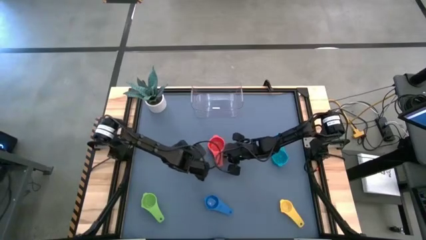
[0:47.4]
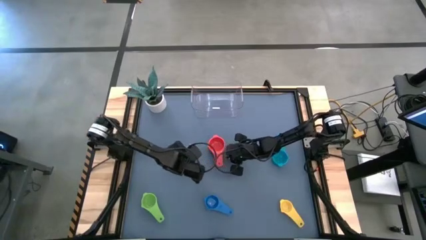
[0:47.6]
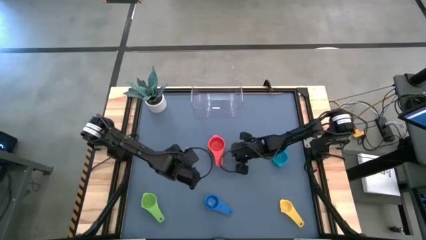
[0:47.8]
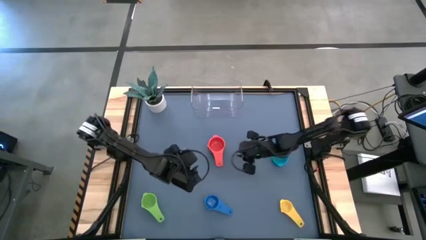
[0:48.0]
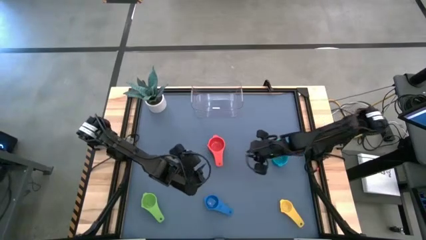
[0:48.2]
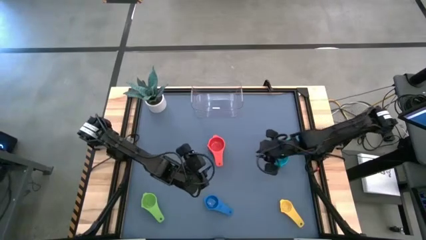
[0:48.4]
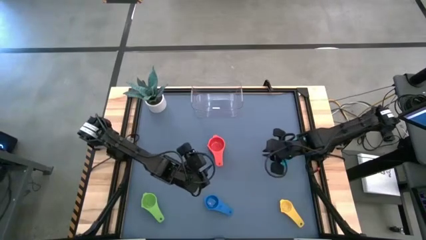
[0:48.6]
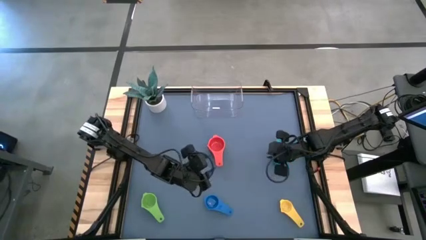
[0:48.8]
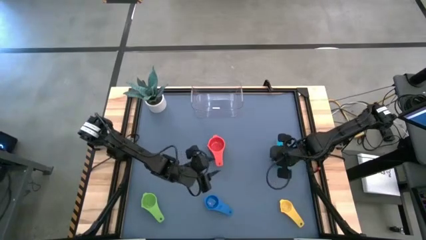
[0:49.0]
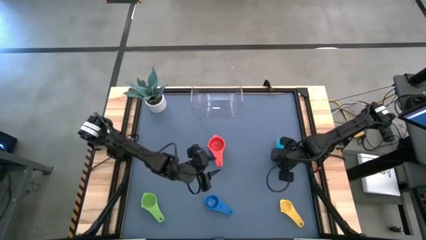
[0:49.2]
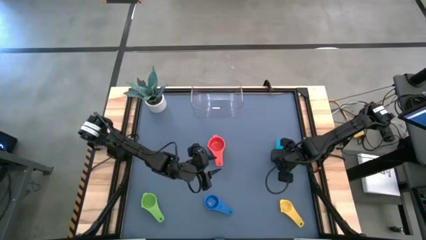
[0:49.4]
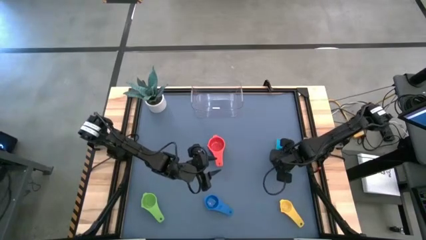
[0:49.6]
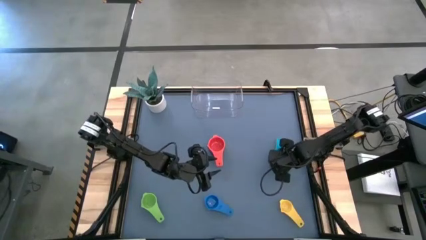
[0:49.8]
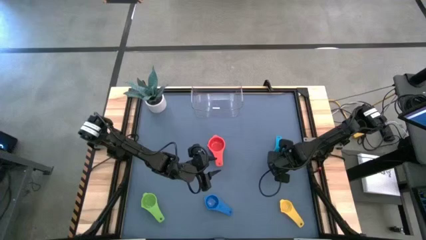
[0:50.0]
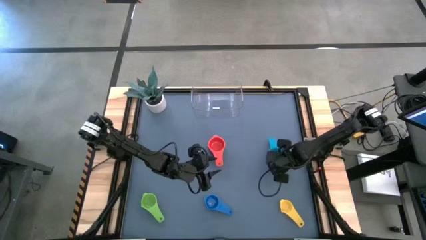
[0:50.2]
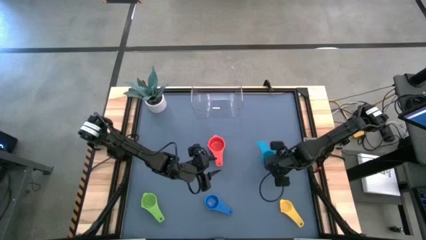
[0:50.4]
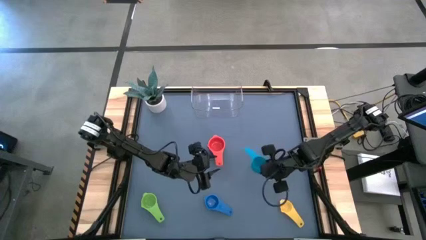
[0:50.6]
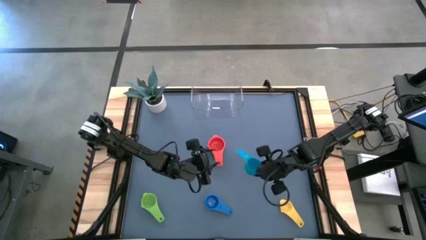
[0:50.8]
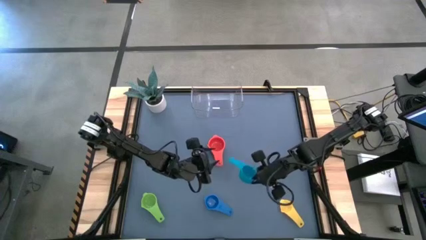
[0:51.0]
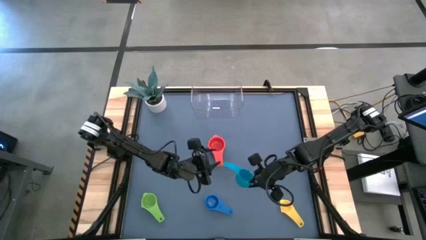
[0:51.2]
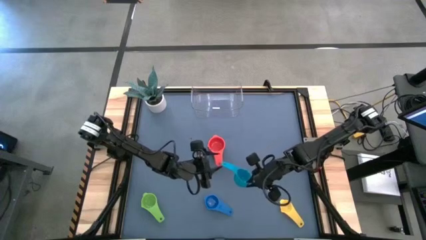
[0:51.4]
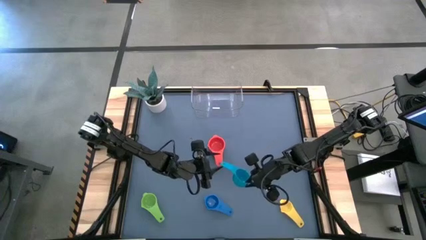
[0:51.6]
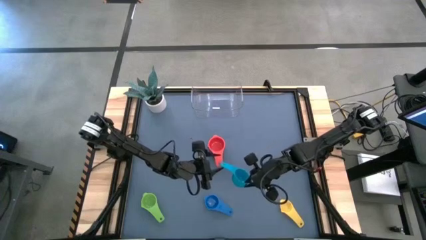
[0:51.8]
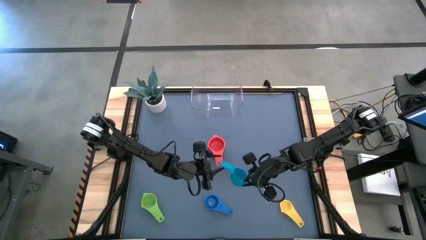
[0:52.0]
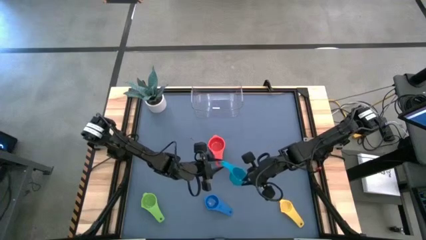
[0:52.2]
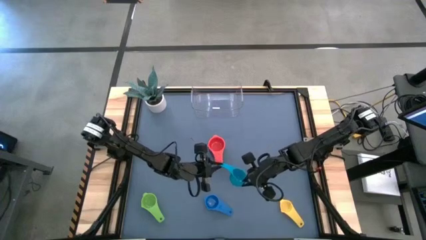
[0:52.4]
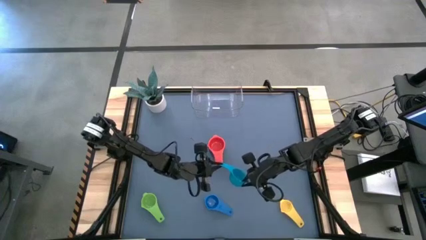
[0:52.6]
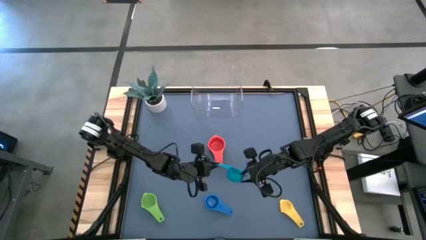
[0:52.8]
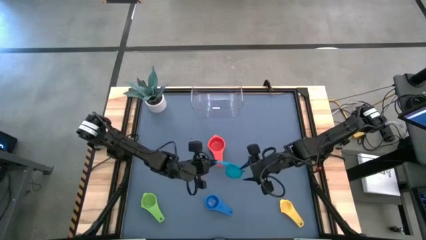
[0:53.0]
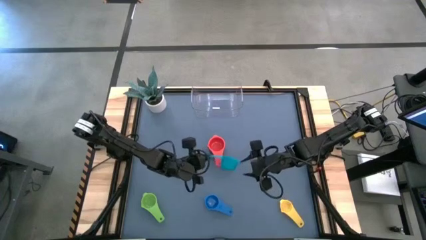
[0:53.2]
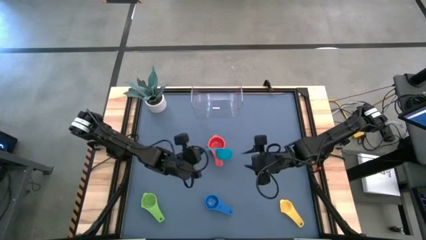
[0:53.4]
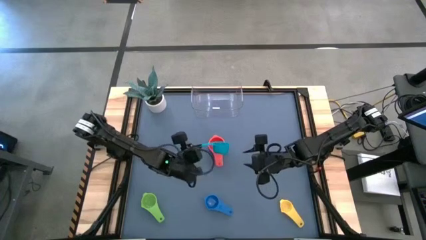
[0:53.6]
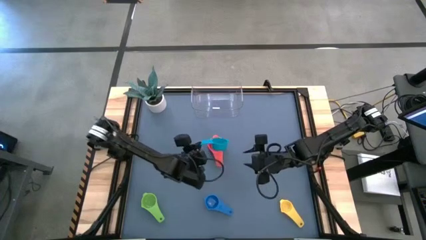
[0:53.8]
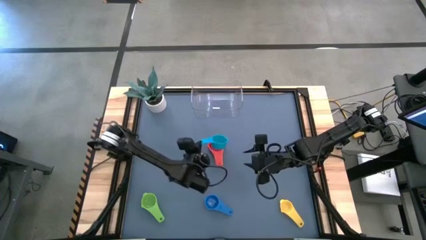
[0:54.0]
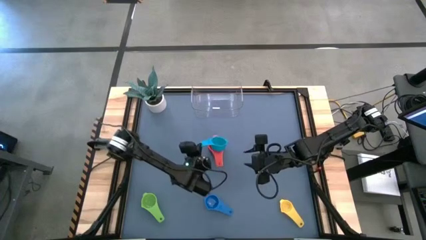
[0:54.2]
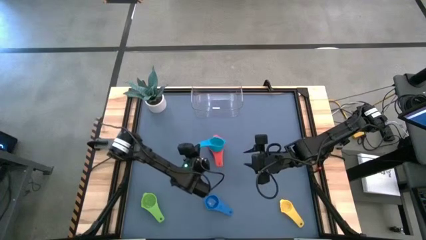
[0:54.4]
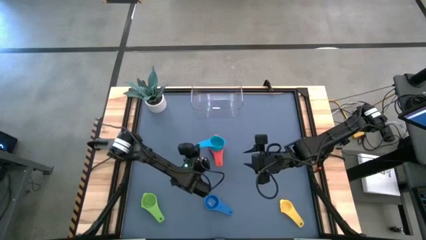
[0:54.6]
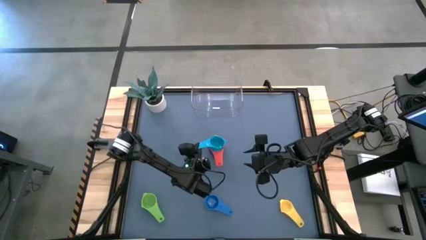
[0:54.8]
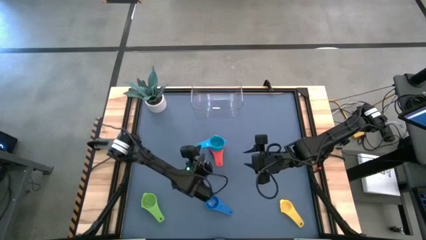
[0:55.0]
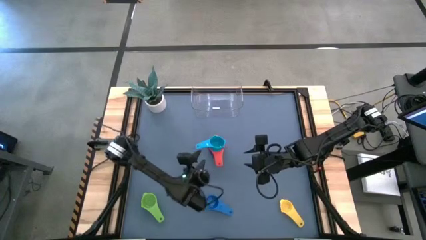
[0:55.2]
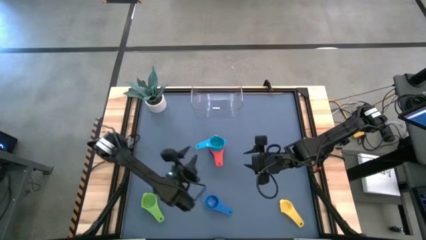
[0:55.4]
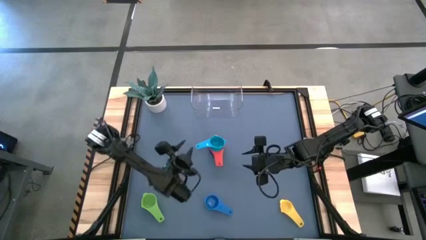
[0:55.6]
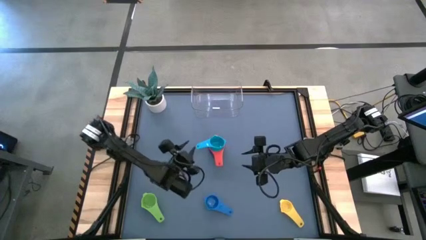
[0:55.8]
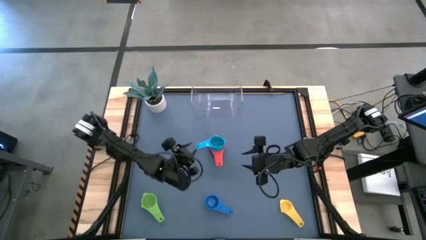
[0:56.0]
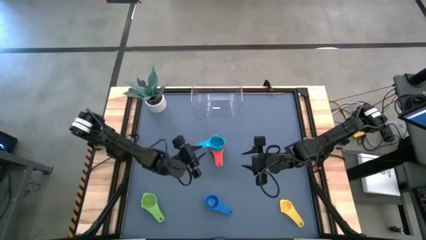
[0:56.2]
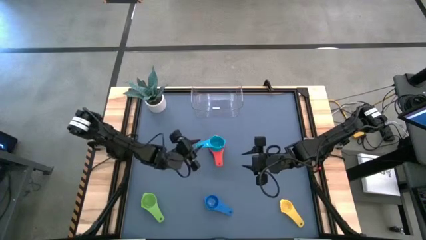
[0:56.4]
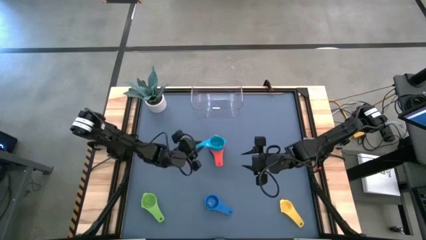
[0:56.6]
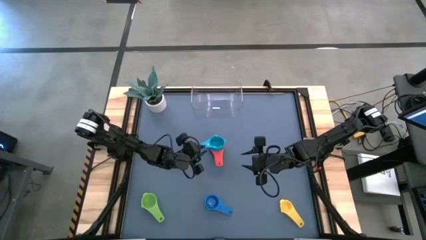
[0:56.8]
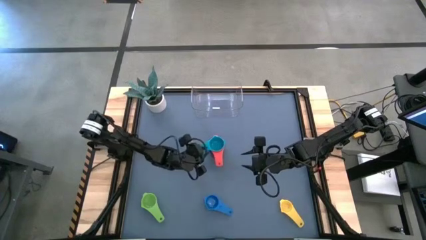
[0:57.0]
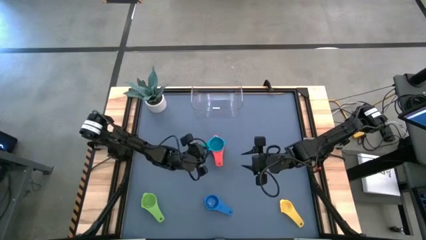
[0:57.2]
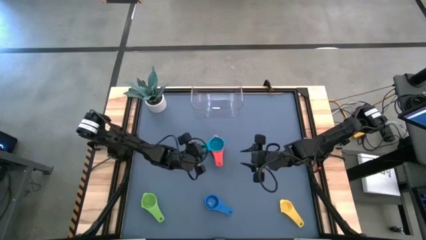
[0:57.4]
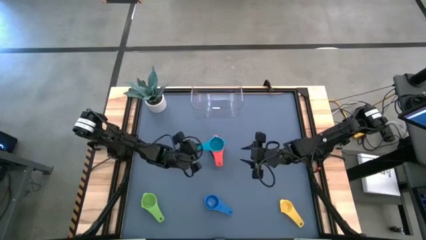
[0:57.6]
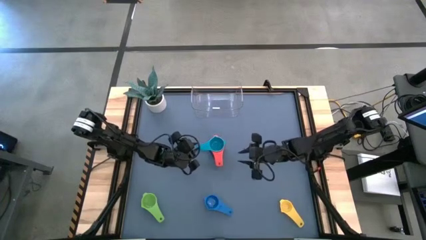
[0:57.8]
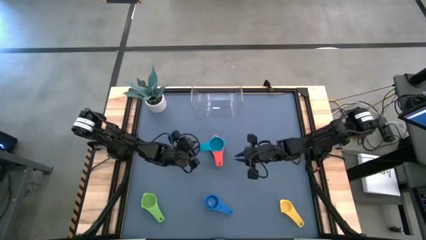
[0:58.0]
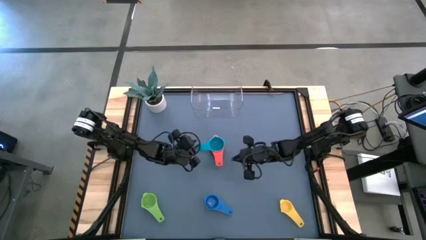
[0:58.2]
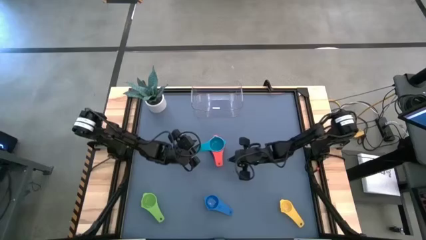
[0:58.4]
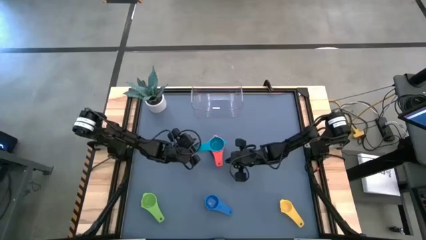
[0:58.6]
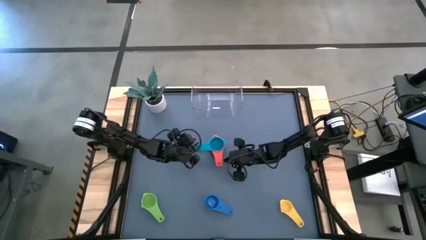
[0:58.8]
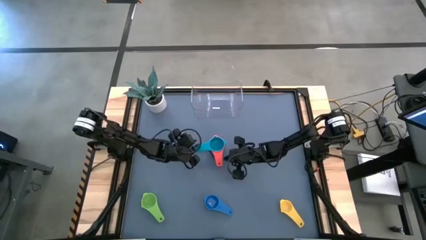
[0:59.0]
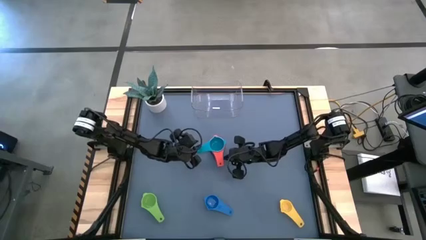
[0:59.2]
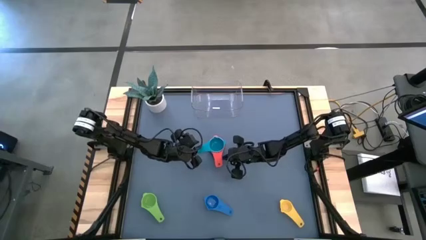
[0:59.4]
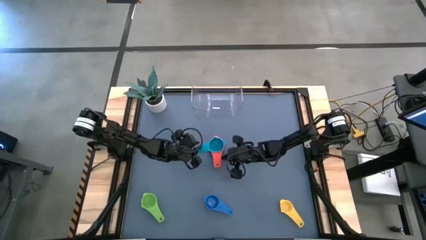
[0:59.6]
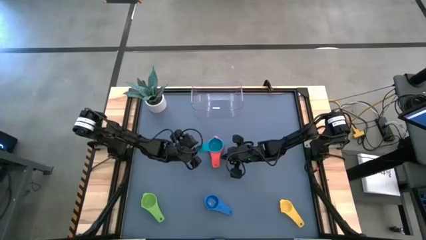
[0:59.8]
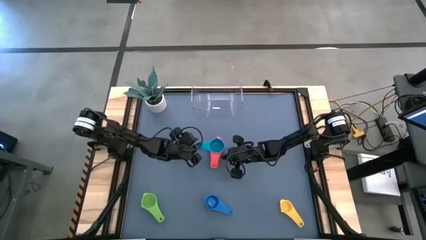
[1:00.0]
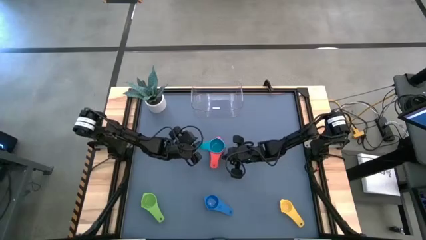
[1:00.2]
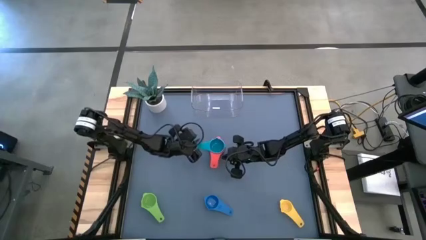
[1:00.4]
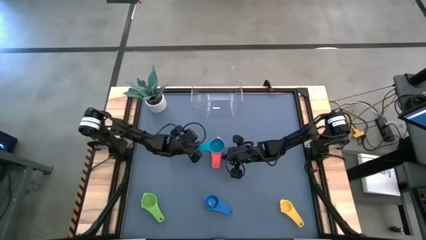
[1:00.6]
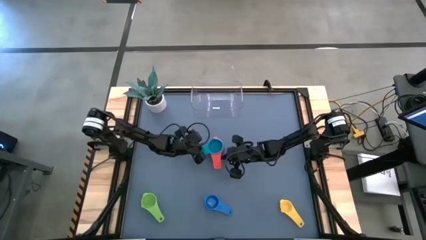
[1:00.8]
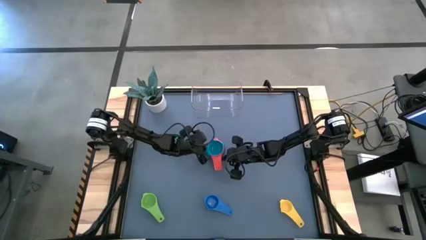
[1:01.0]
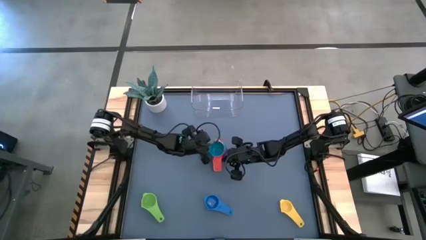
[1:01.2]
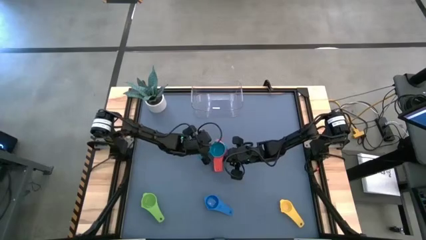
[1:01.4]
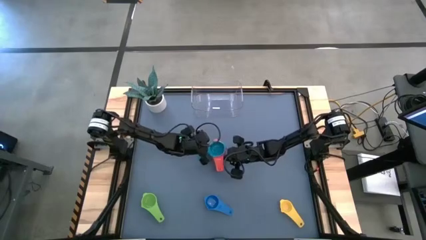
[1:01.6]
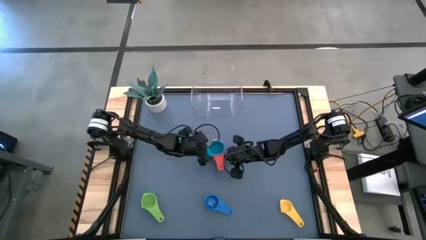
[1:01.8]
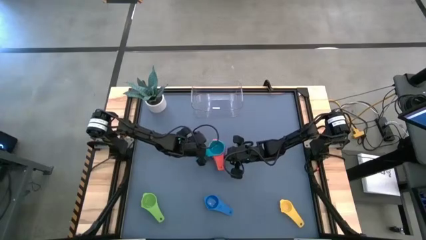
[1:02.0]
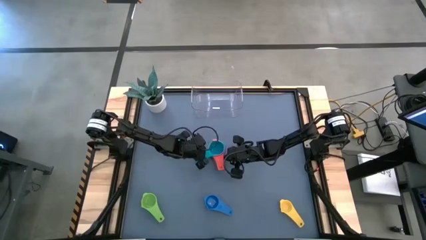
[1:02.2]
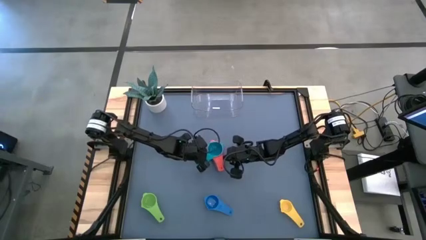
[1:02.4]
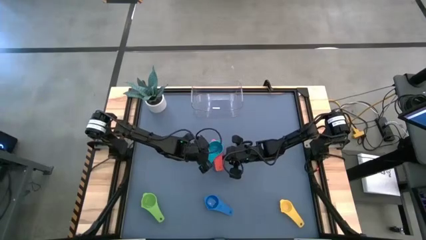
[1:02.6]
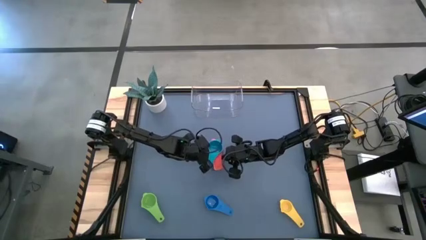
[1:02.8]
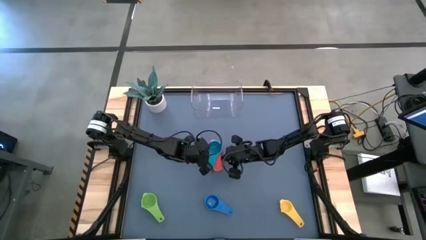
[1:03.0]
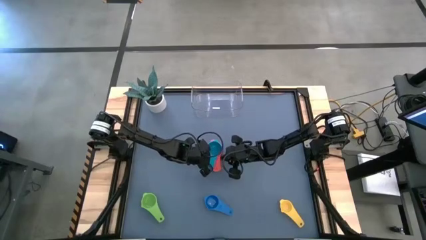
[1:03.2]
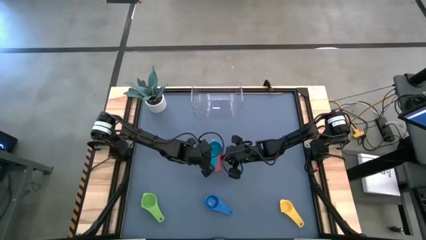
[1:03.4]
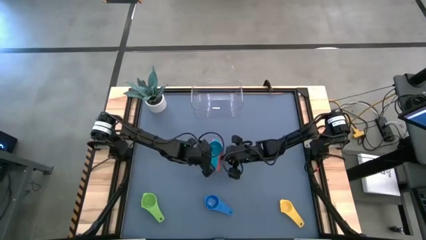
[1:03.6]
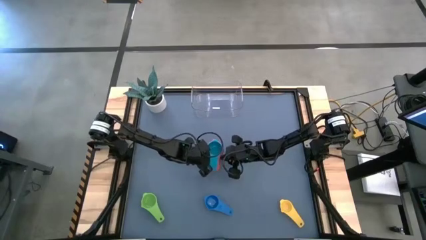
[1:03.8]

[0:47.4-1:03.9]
Task: Nest measuring cups in basket
Stack the light blue measuring cup on top of the red measuring cup
